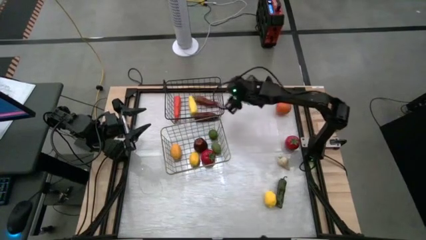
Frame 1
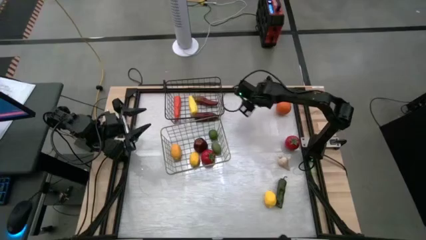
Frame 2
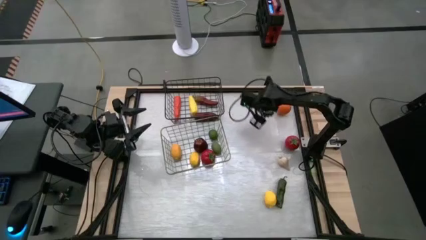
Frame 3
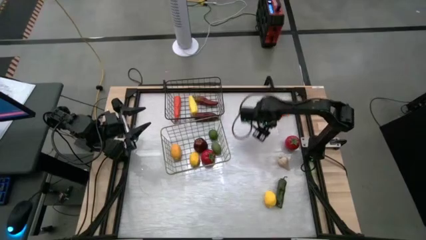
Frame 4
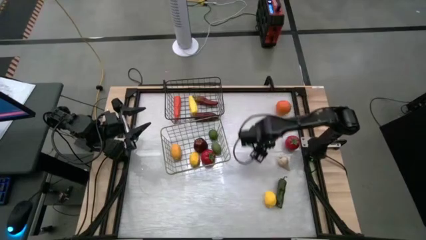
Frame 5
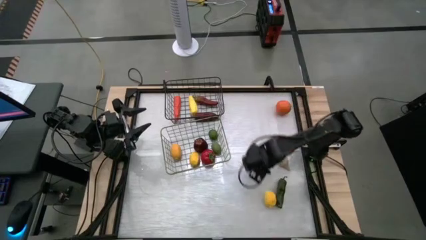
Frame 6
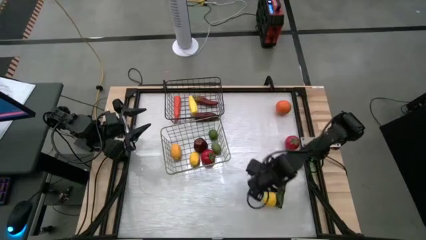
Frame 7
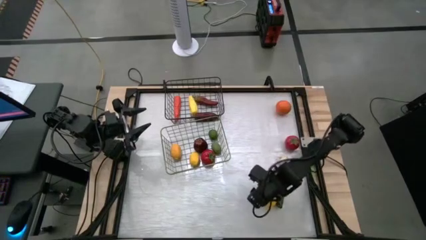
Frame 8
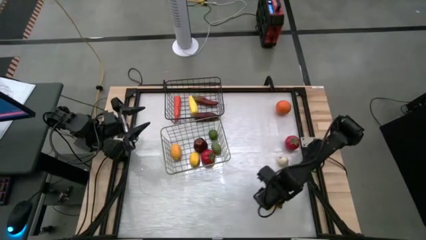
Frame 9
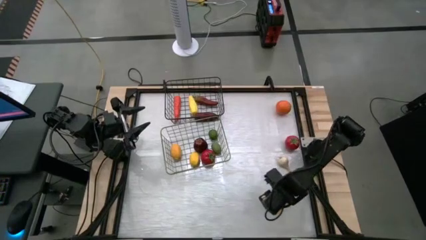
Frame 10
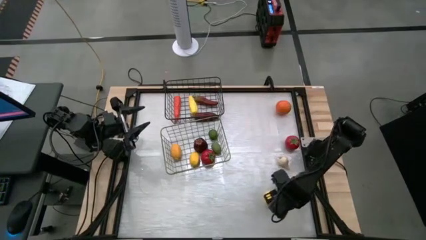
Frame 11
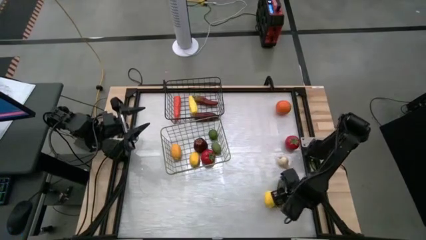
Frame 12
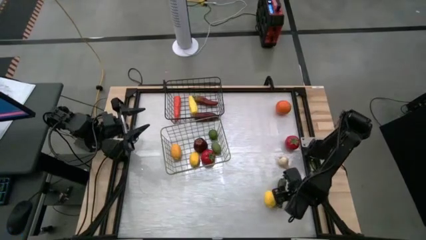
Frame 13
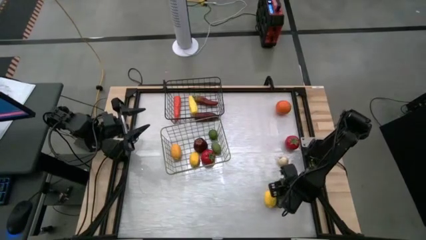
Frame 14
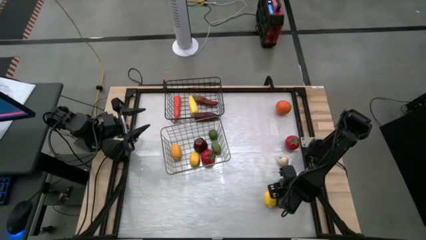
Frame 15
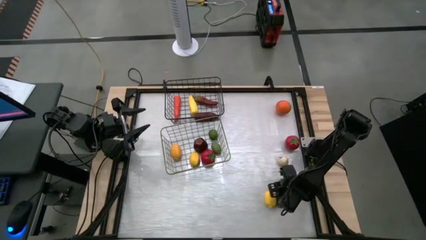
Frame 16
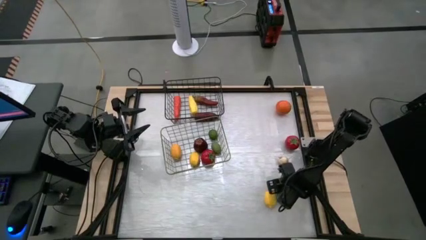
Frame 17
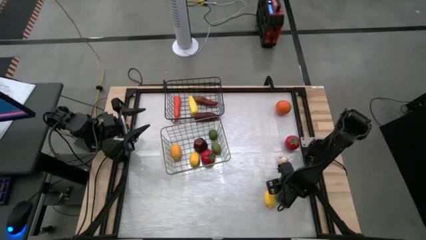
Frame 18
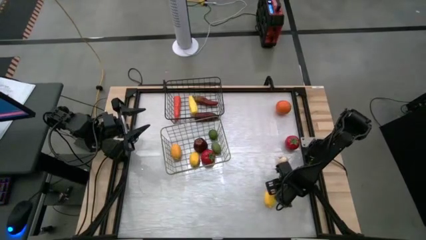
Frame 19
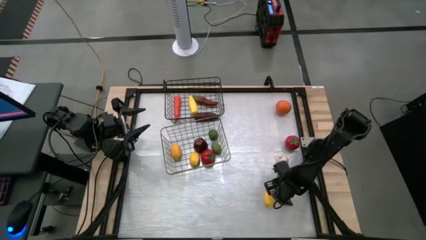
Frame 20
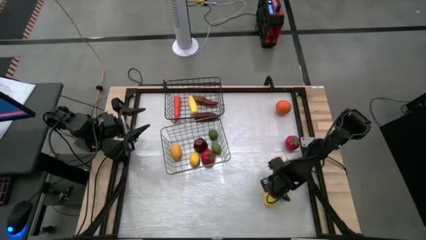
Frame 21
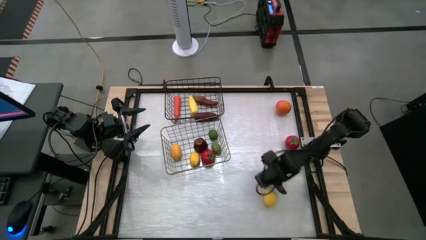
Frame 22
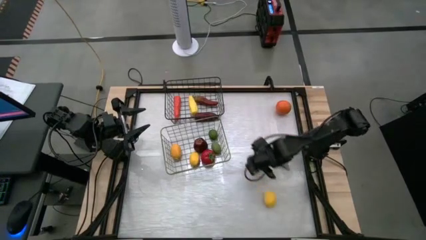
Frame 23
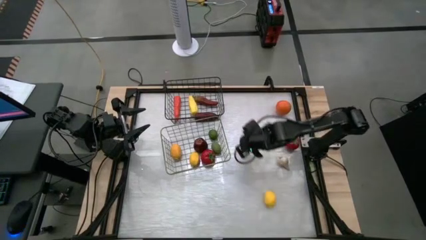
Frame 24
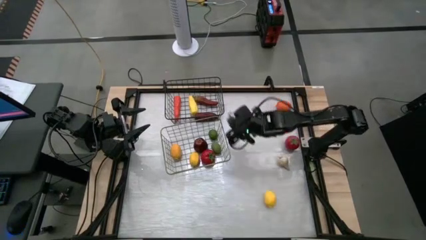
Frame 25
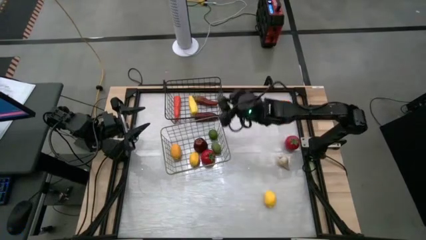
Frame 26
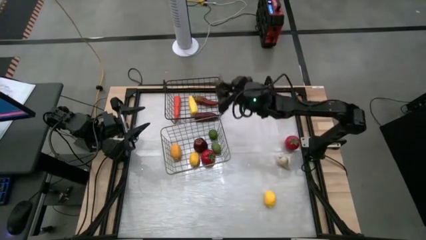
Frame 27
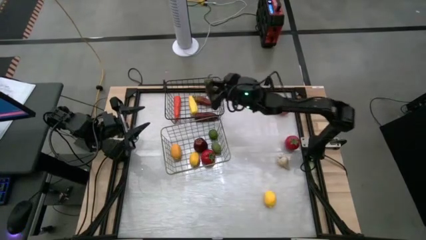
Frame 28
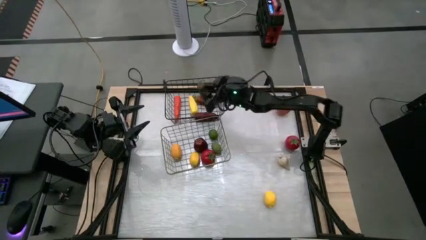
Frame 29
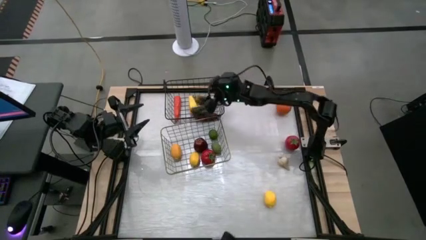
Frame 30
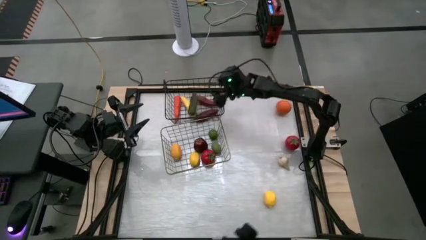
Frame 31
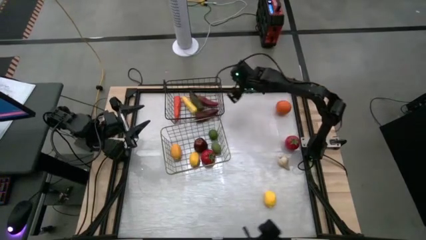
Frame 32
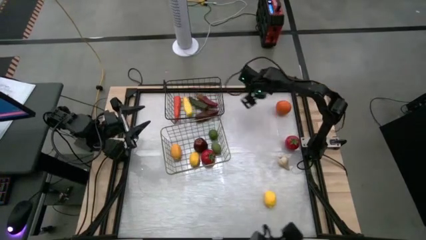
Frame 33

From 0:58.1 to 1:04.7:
Task: Sort produce into baskets
Put the green chili pepper into the black wire basket

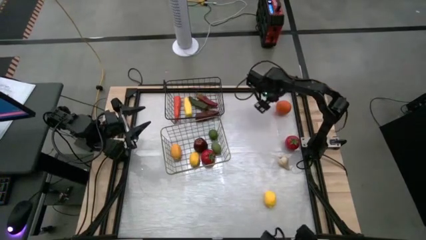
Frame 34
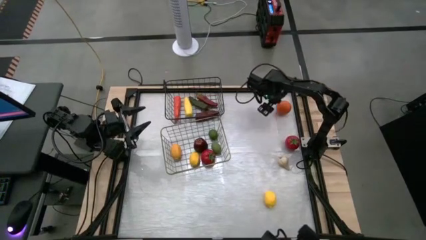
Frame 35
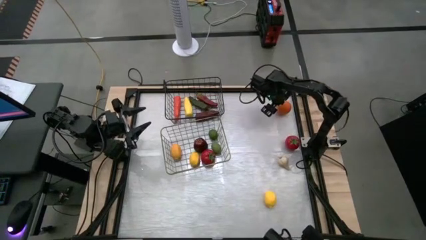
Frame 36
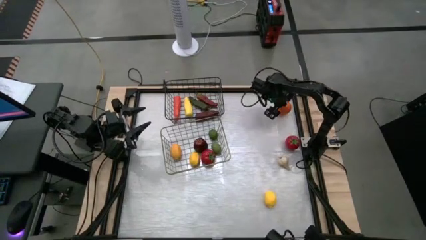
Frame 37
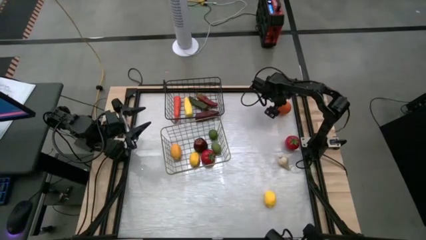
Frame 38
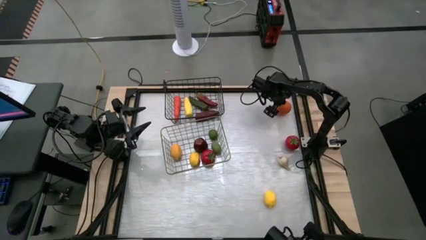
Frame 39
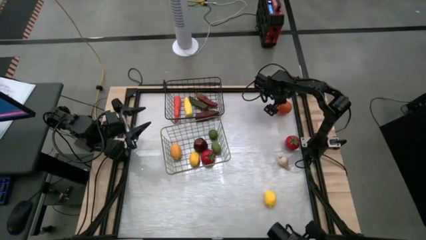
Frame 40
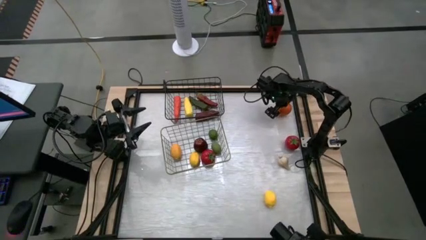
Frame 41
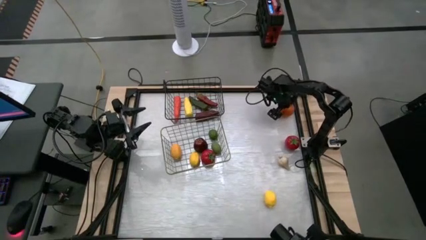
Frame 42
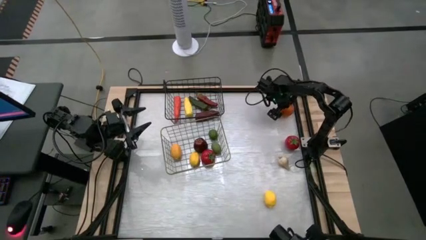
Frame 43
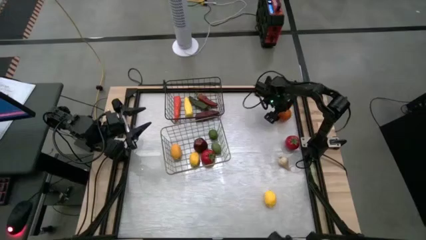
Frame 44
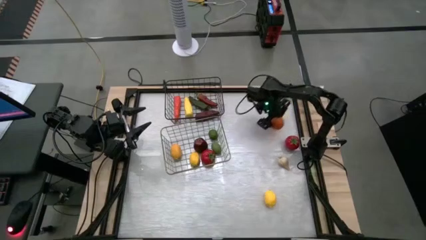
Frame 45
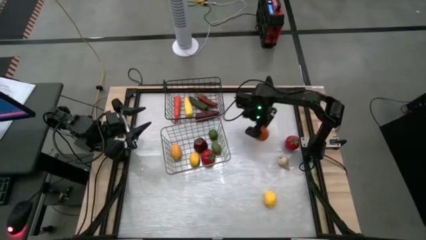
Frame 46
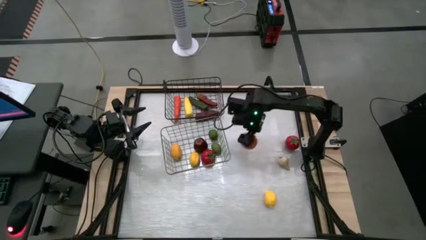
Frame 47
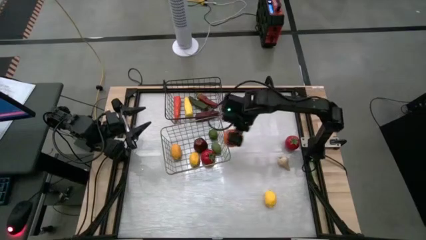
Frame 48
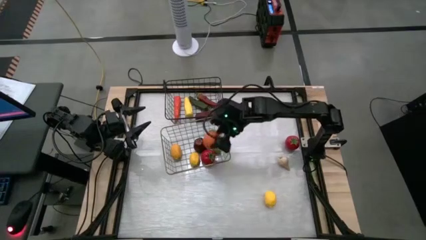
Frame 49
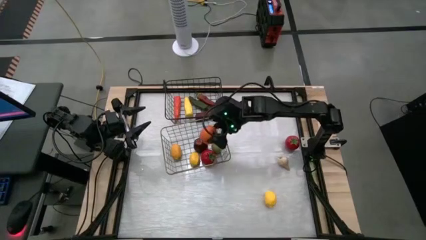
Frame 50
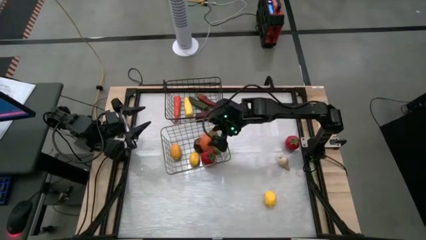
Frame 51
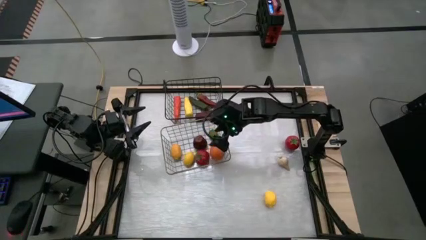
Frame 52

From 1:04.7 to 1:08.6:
Put the orange into the brown wire basket

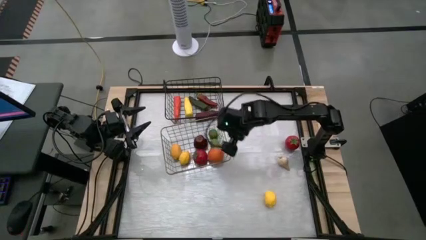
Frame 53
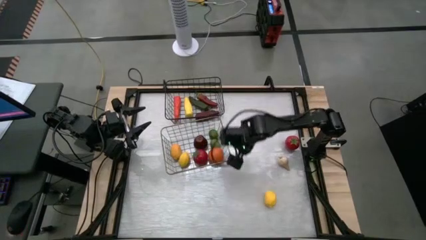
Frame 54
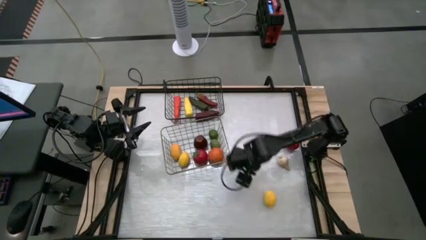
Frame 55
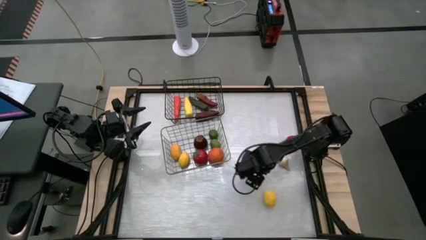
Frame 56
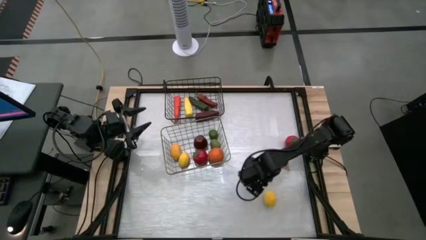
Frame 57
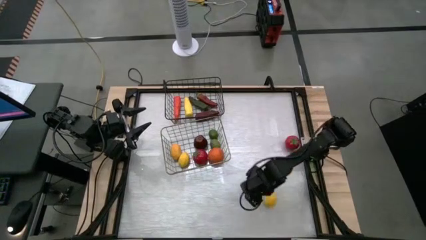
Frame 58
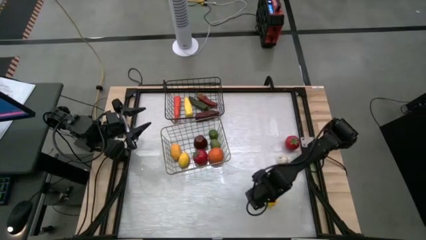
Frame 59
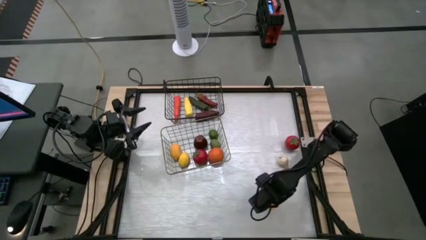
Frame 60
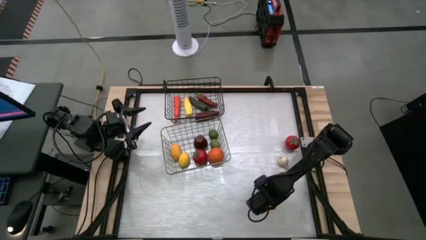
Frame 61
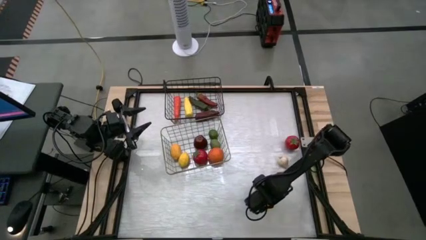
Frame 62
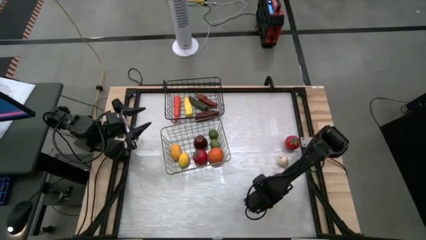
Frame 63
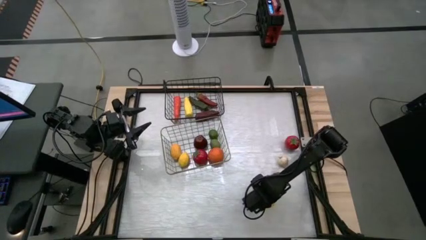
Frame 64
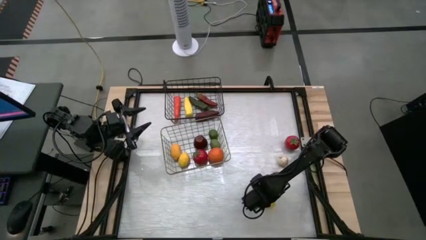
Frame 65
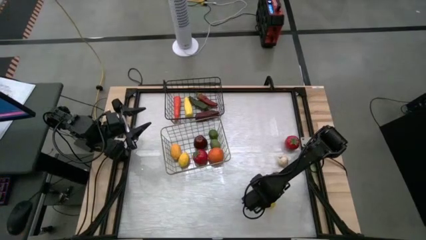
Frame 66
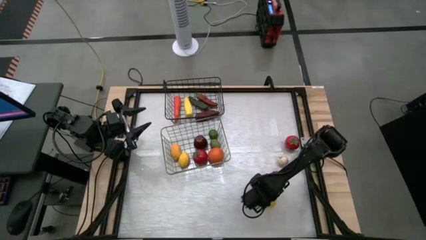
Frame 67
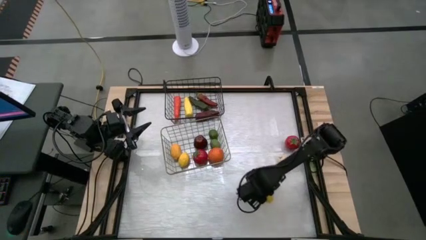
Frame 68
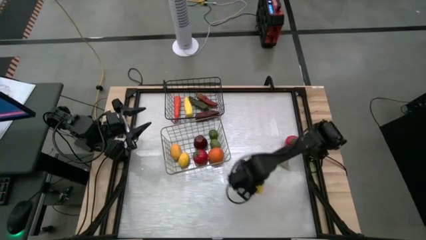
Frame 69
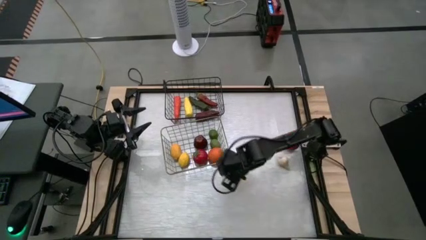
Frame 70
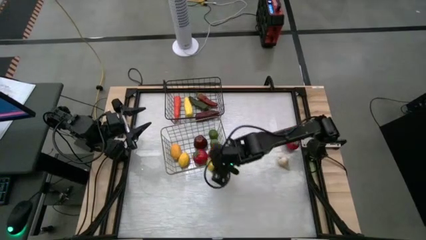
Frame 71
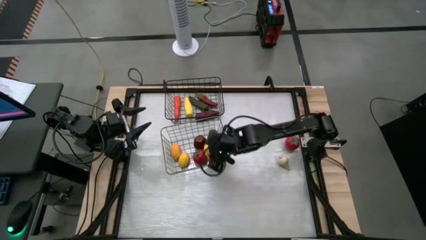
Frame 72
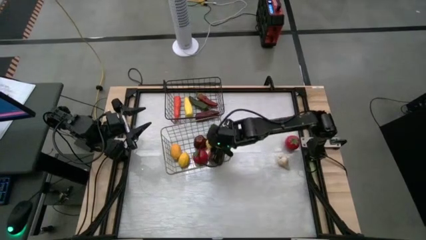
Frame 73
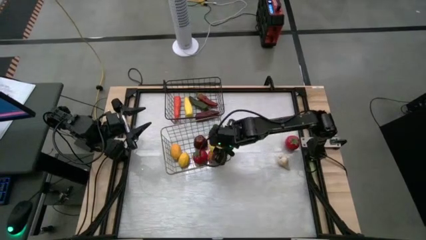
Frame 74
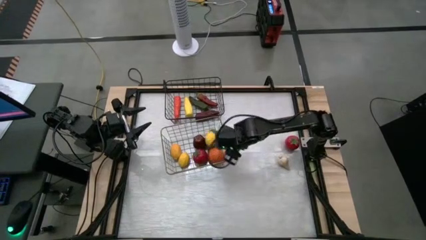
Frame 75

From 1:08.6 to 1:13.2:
Put the yellow lemon into the brown wire basket

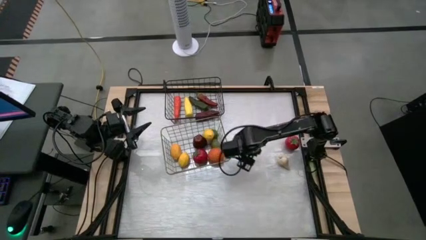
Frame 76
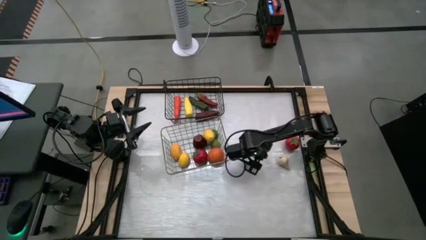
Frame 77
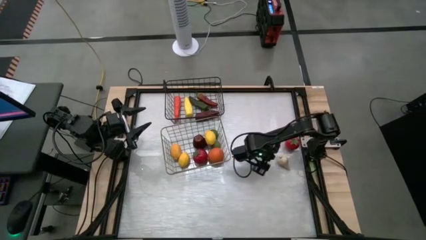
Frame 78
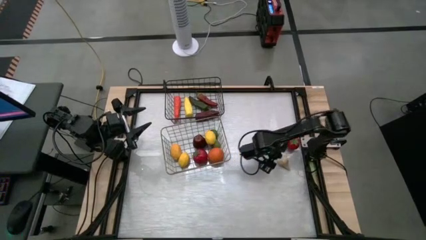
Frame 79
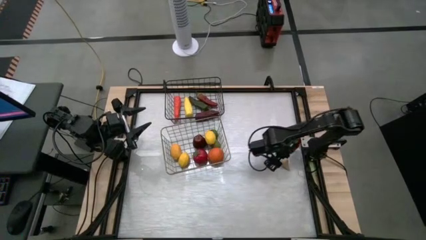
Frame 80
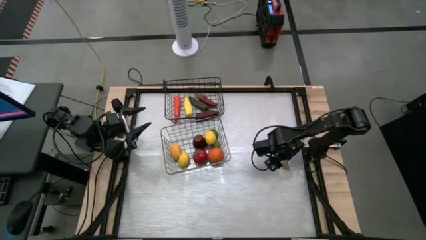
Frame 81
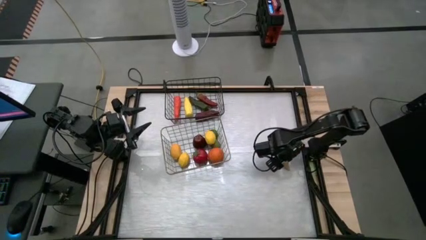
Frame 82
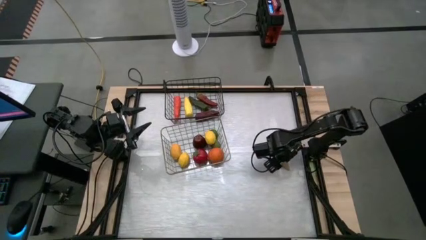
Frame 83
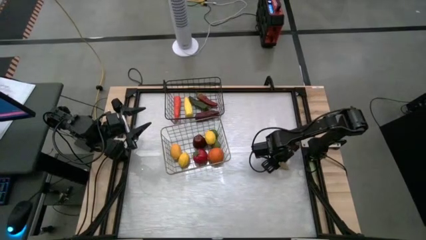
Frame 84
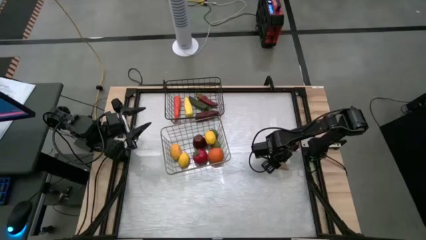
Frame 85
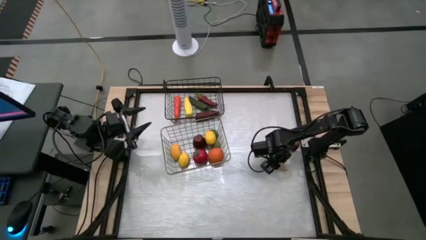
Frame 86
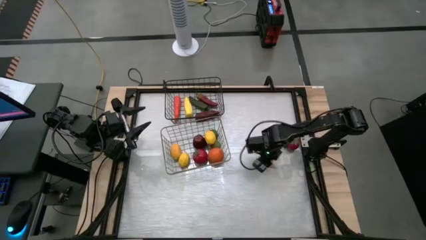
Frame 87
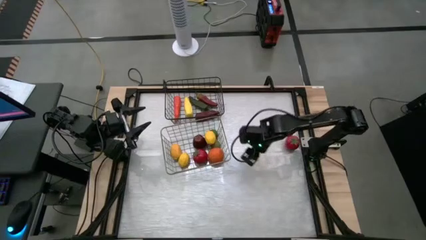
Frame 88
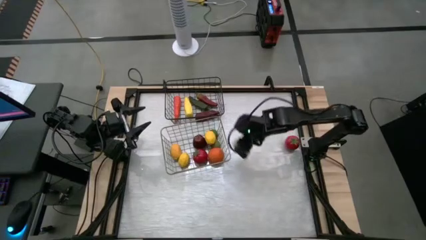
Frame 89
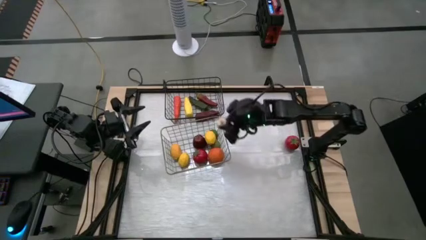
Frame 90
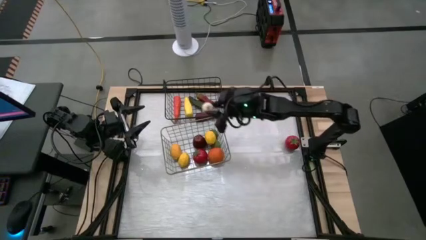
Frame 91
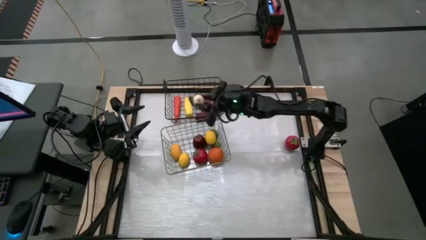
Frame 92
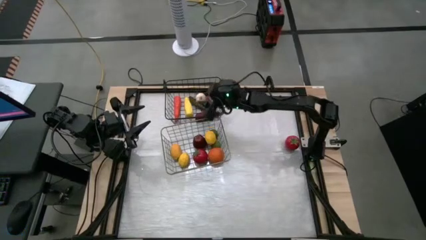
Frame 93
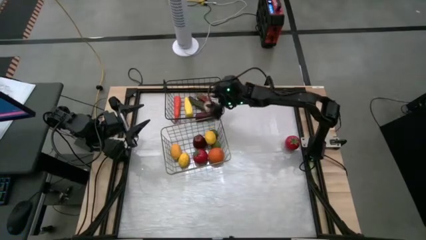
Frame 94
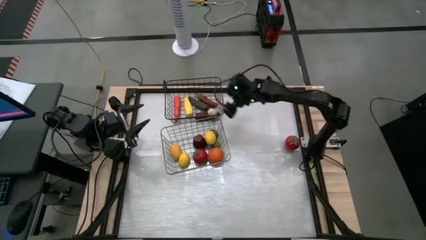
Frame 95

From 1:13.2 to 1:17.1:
Put the white garlic into the black wire basket
